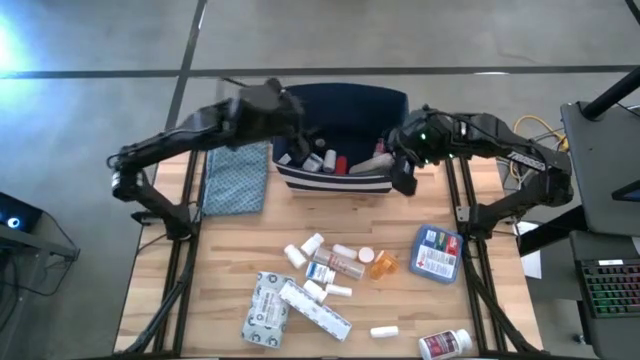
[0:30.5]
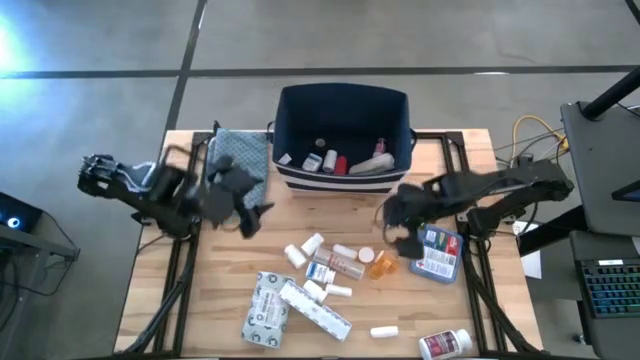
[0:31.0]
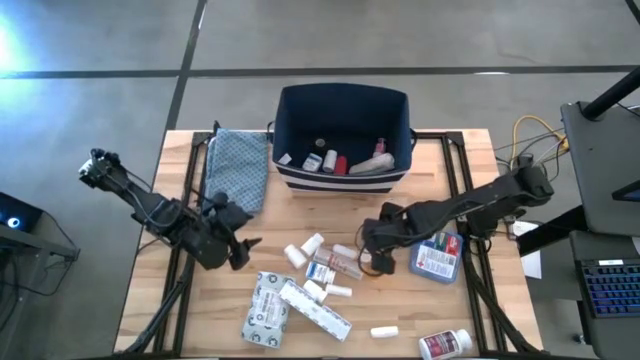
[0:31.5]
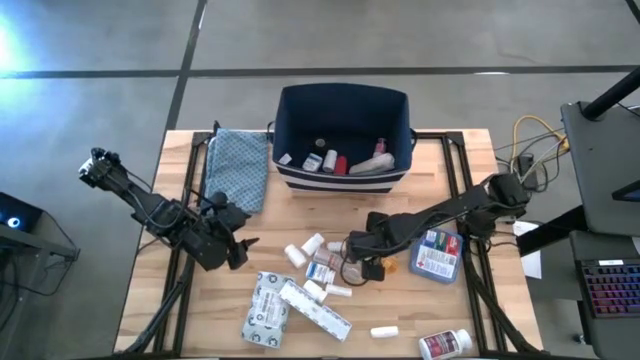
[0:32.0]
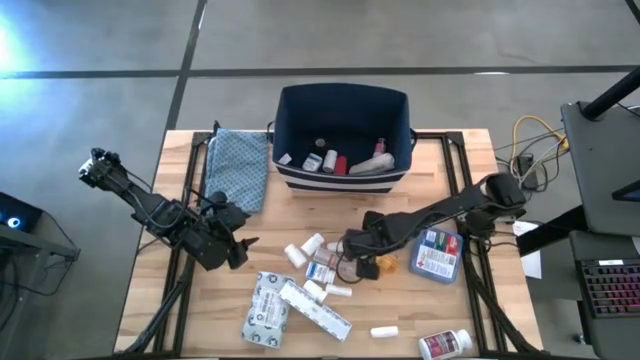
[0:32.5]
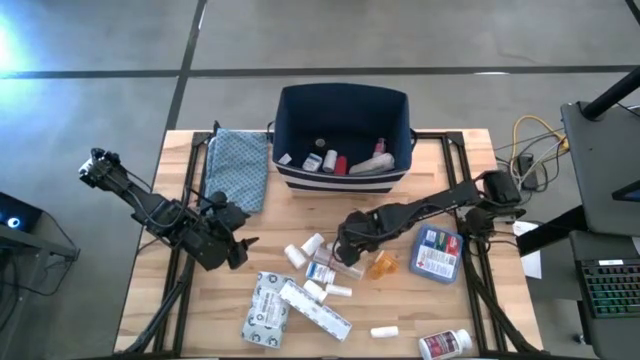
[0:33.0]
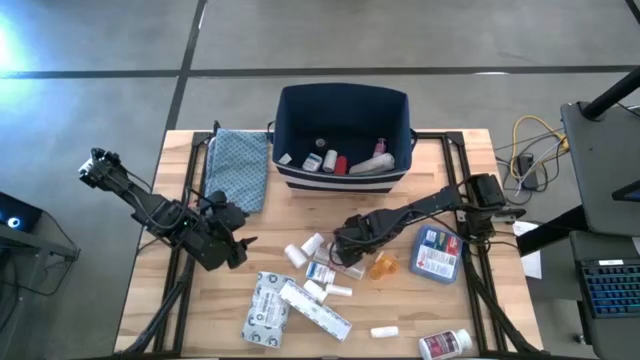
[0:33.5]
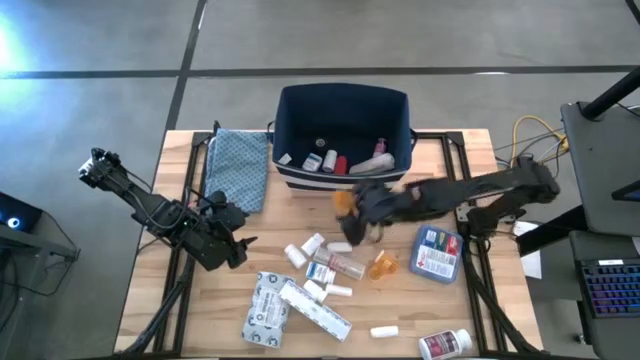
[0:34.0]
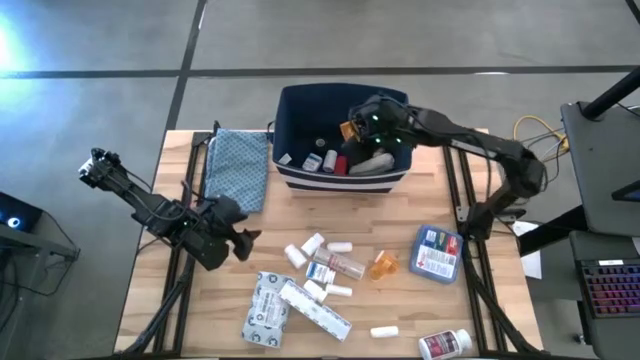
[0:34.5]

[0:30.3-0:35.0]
Task: Pick & place medical supplies in basket/bin
Put the yellow pill bottle into the bin

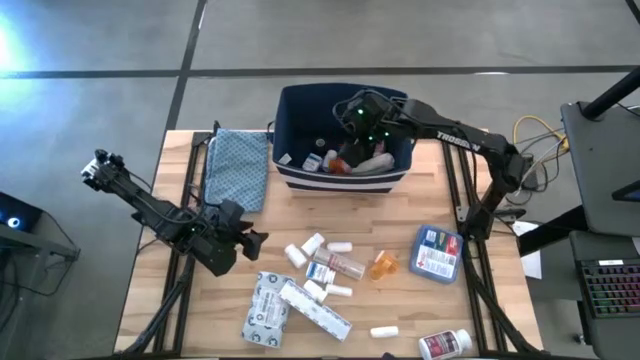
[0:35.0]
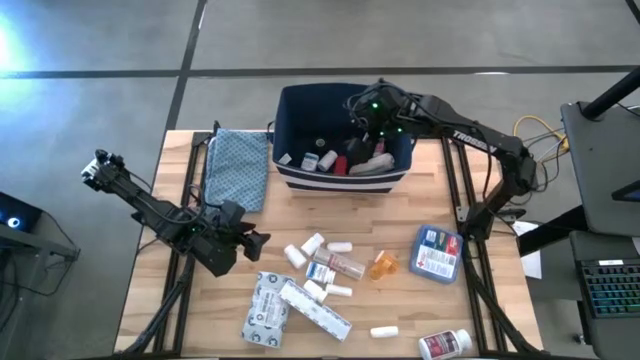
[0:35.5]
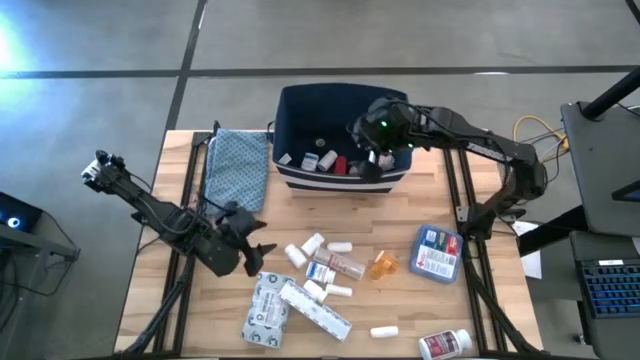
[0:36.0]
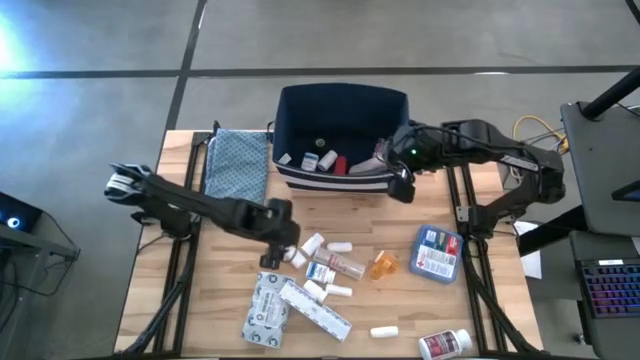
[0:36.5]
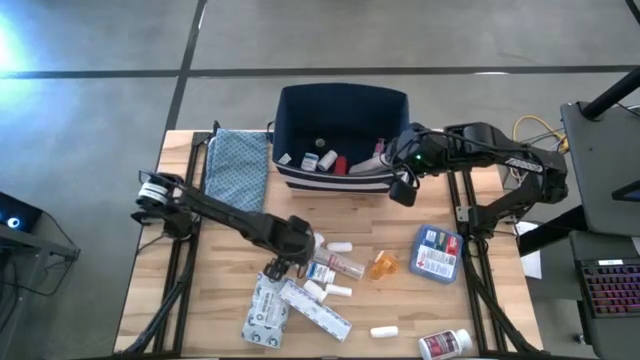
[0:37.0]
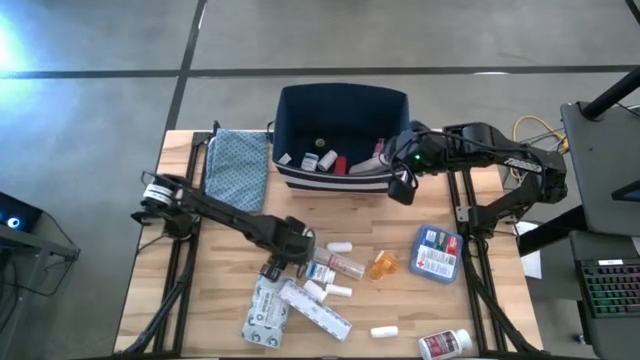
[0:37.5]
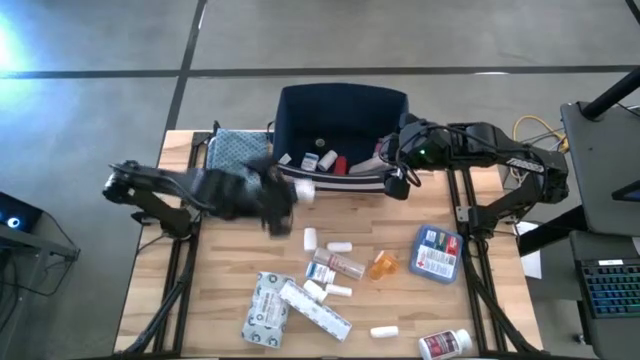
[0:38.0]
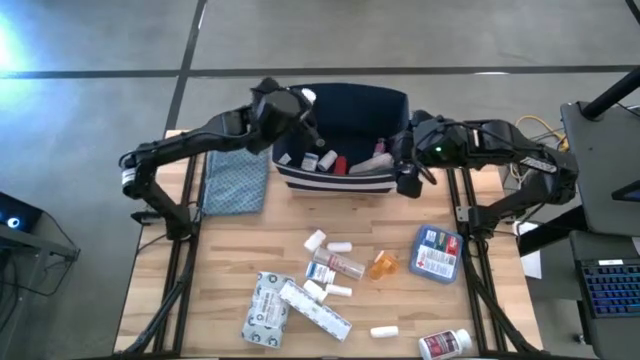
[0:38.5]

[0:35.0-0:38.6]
Put the white pill bottle into the bin

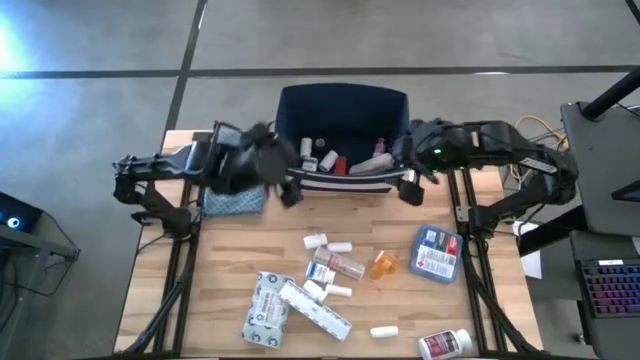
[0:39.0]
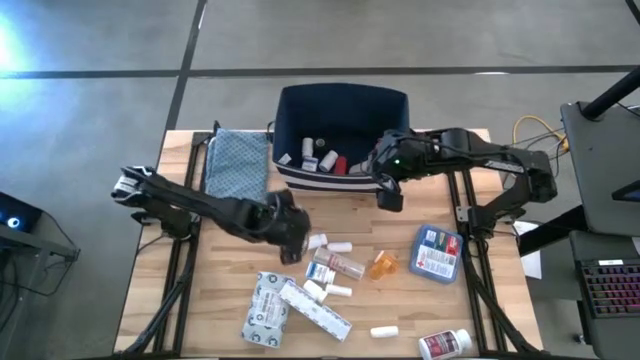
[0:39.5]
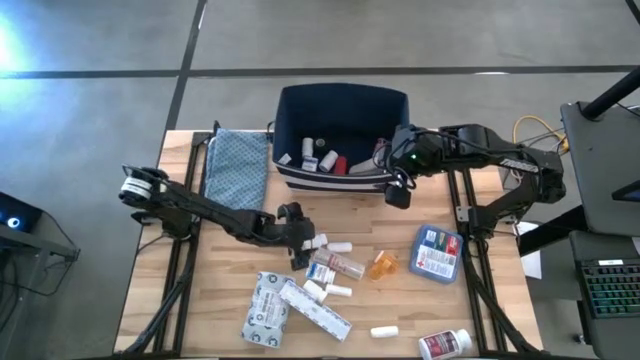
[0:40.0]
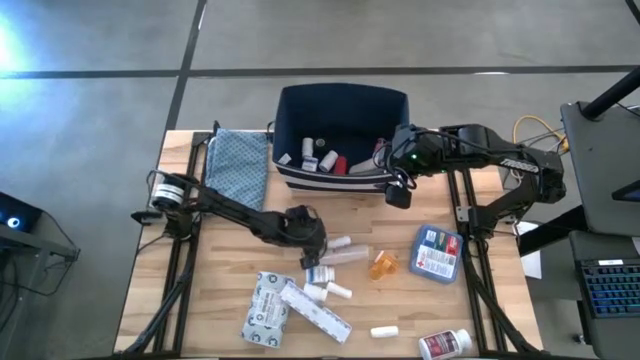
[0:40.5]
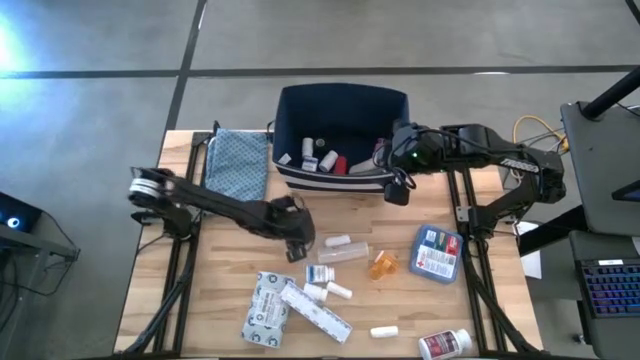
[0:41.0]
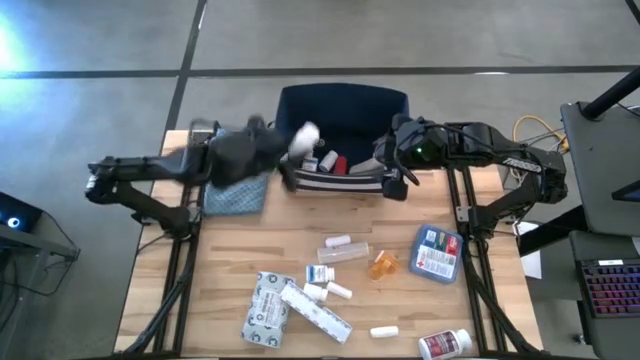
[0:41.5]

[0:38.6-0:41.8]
Put the white pill bottle into the bin

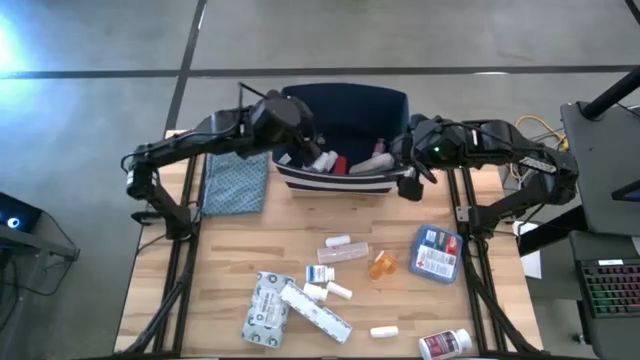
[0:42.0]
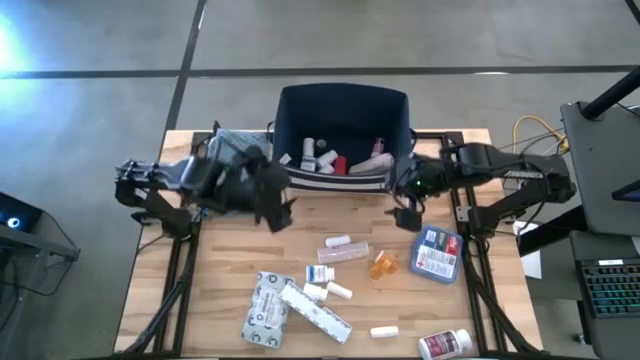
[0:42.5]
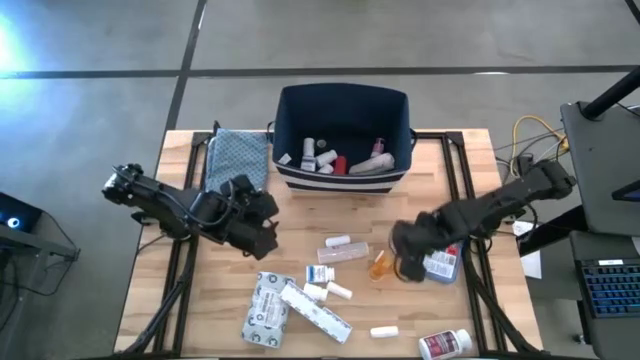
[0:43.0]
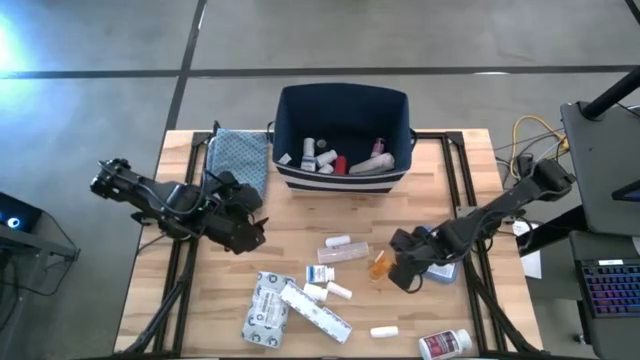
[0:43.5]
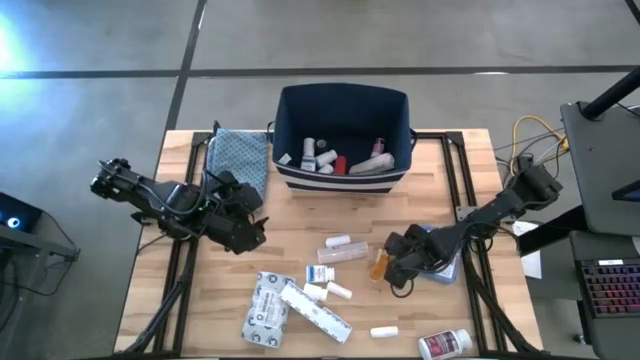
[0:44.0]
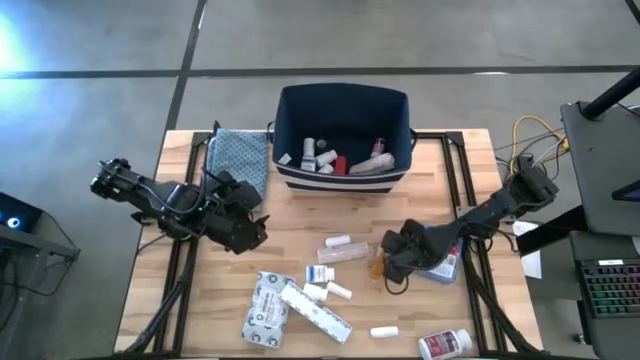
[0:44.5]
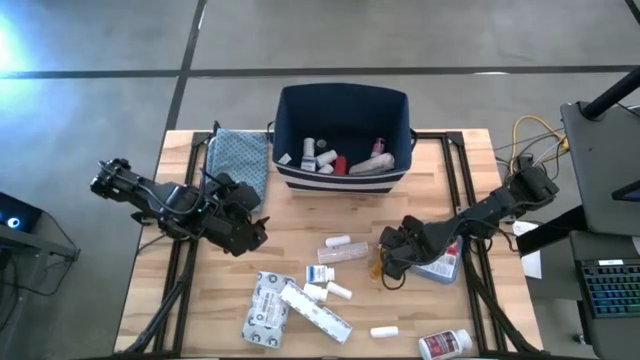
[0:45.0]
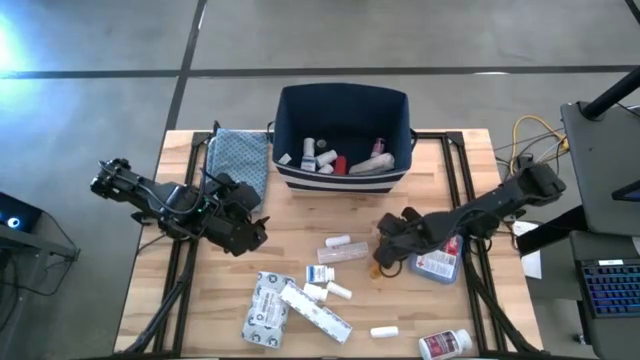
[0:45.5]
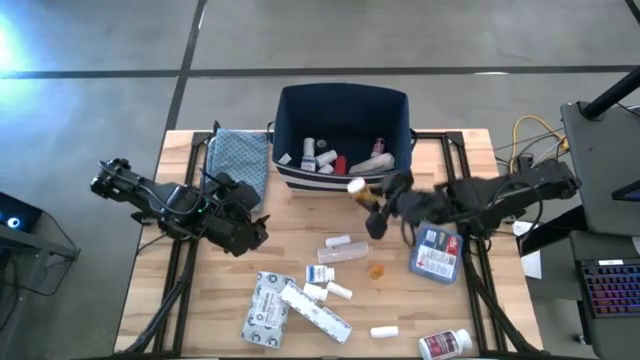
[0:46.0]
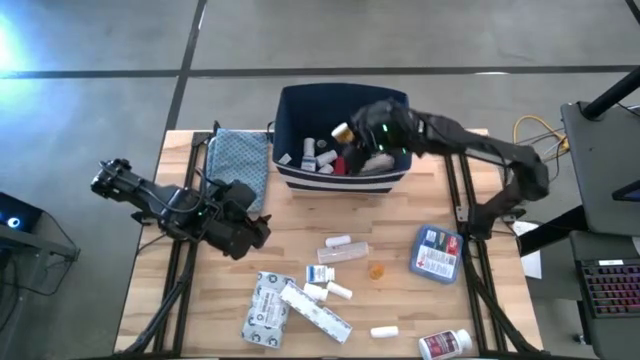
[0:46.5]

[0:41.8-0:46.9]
Put the yellow pill bottle into the bin

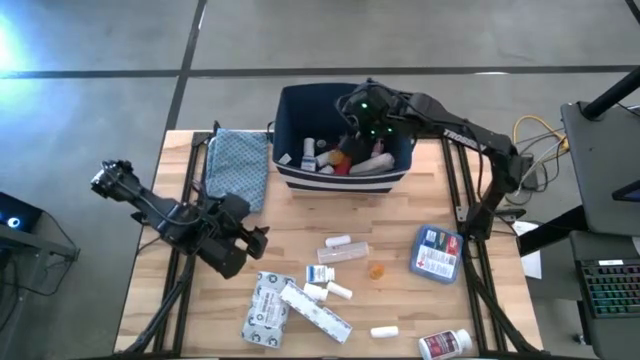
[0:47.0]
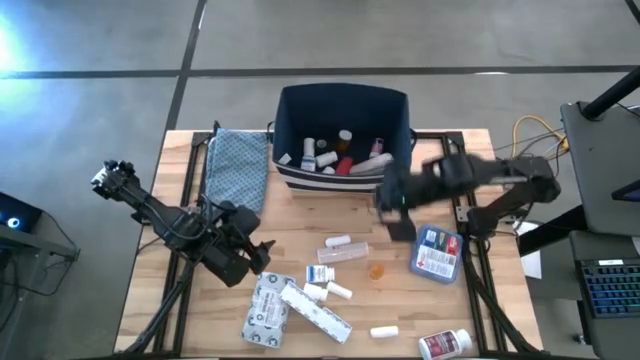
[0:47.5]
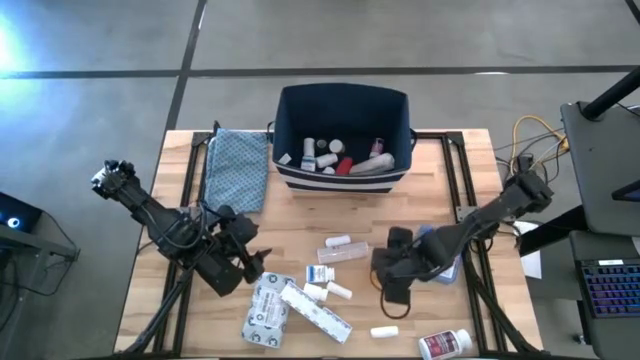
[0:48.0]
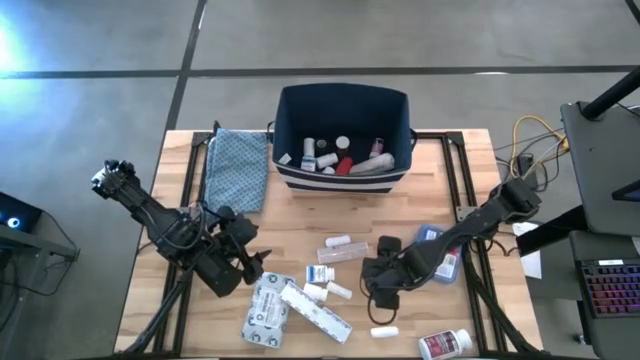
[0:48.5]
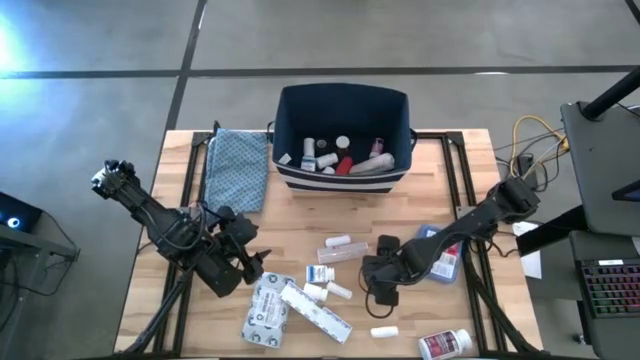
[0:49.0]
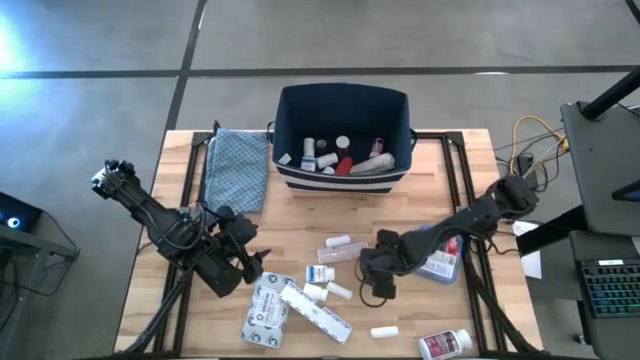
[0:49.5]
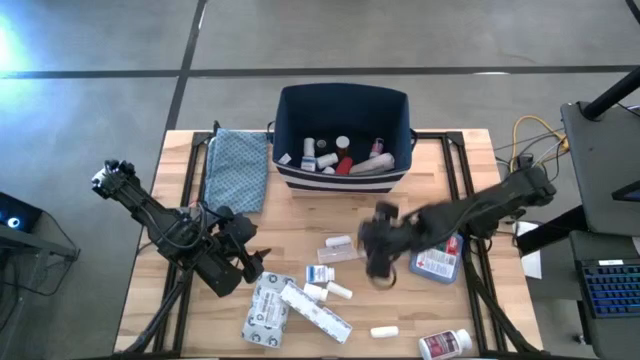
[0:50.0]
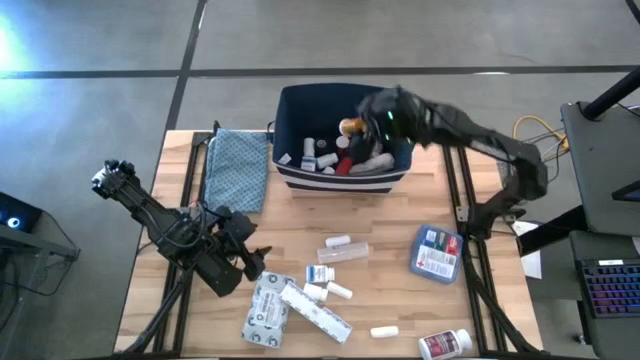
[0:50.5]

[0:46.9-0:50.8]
Put the yellow pill bottle into the bin
